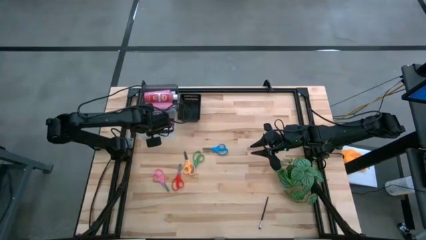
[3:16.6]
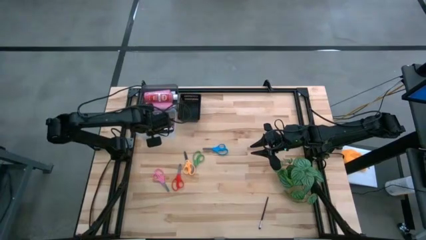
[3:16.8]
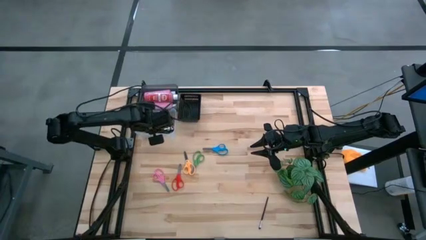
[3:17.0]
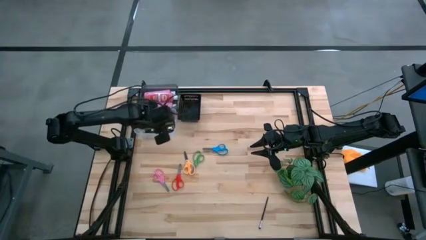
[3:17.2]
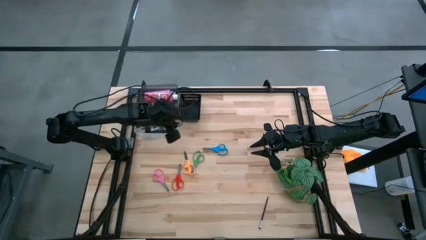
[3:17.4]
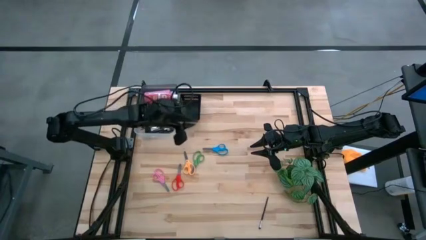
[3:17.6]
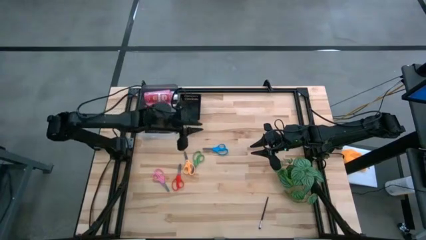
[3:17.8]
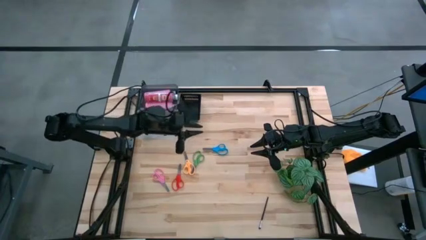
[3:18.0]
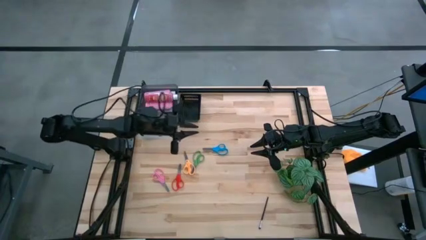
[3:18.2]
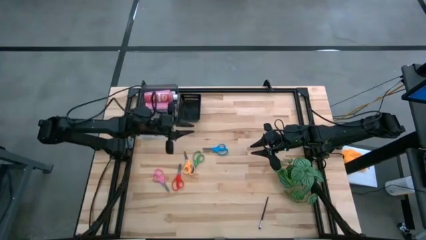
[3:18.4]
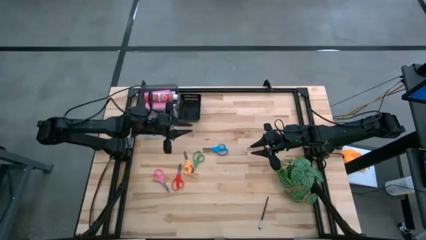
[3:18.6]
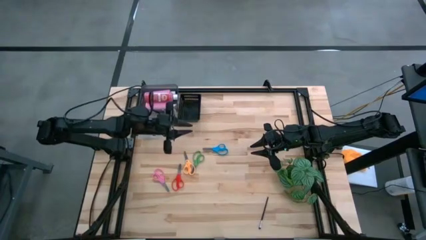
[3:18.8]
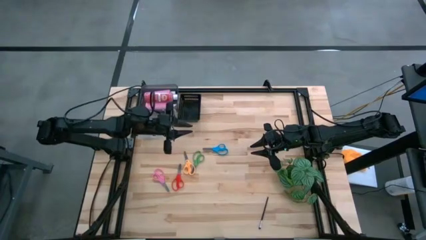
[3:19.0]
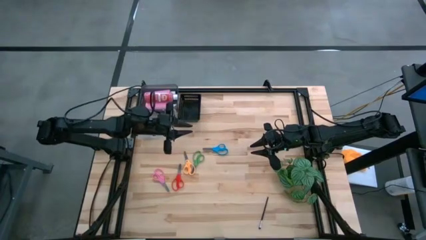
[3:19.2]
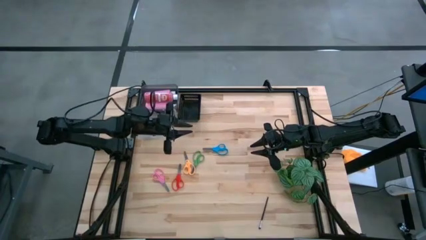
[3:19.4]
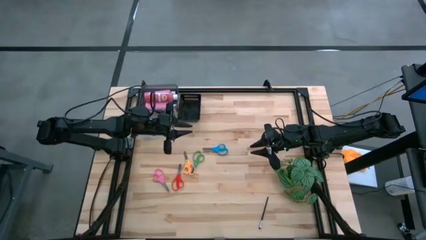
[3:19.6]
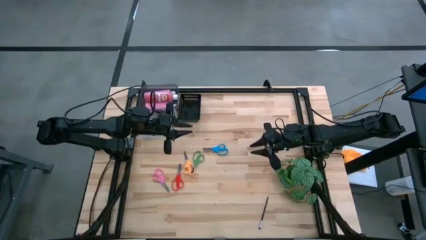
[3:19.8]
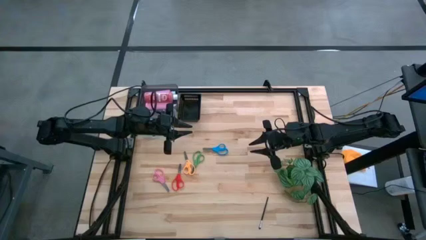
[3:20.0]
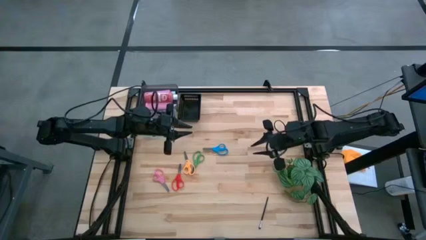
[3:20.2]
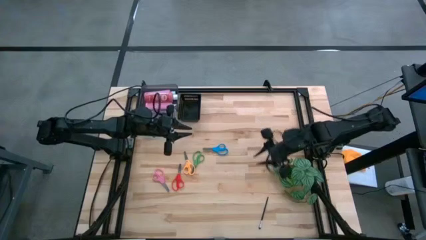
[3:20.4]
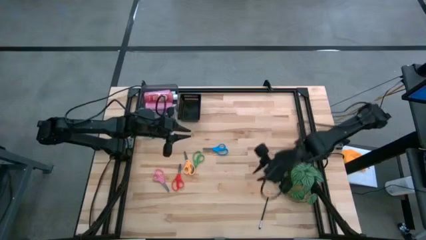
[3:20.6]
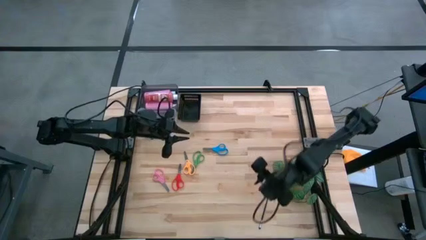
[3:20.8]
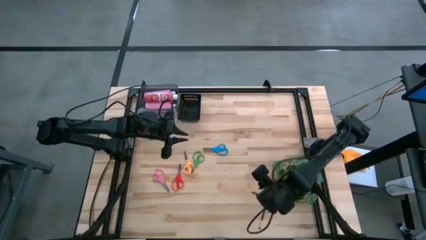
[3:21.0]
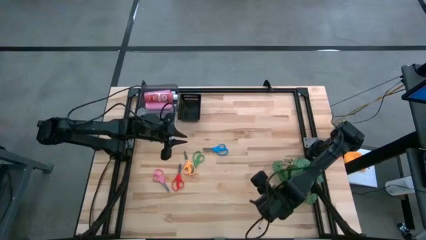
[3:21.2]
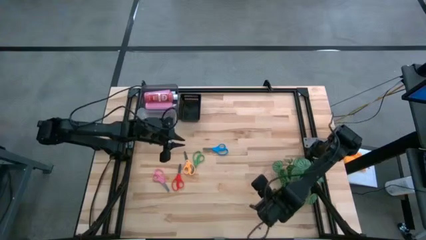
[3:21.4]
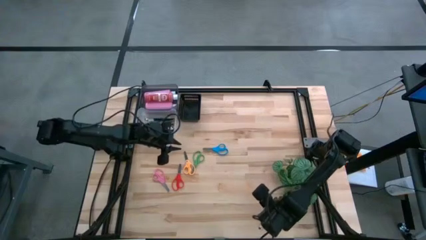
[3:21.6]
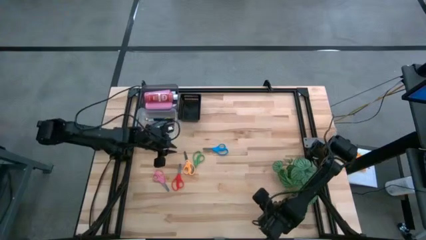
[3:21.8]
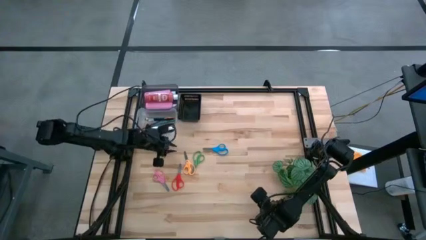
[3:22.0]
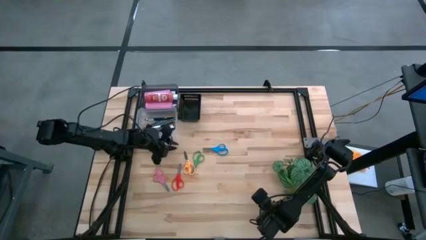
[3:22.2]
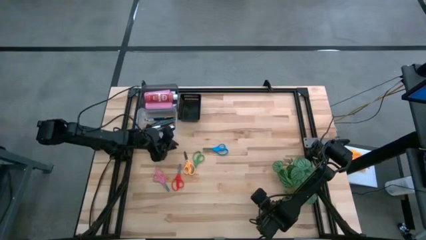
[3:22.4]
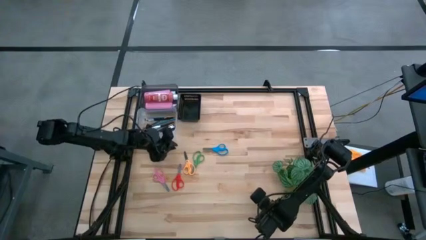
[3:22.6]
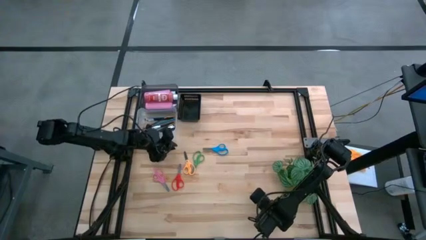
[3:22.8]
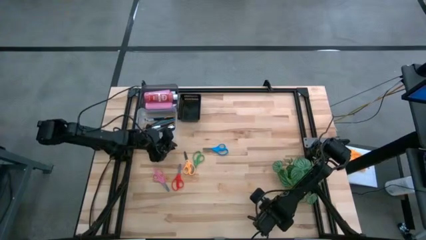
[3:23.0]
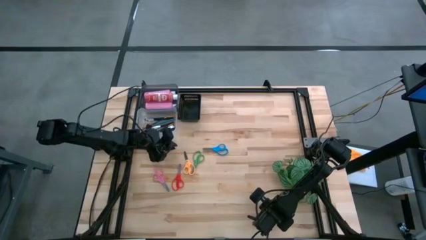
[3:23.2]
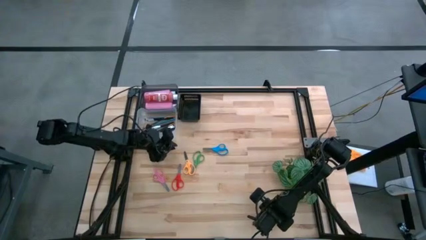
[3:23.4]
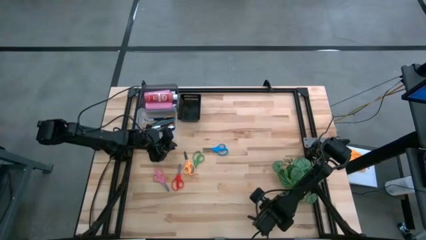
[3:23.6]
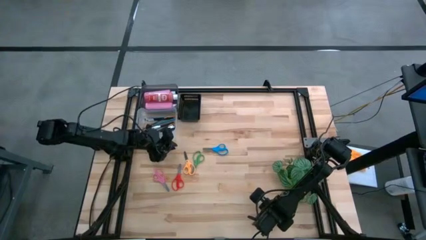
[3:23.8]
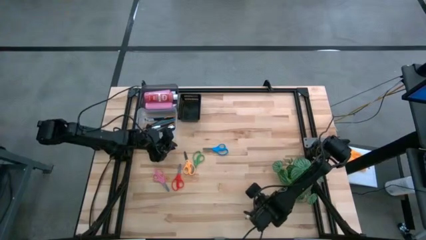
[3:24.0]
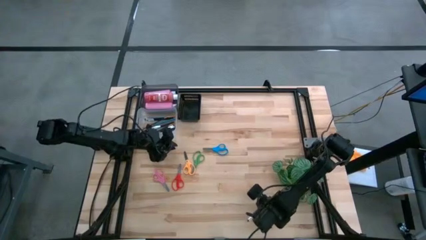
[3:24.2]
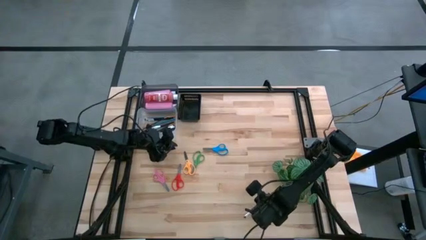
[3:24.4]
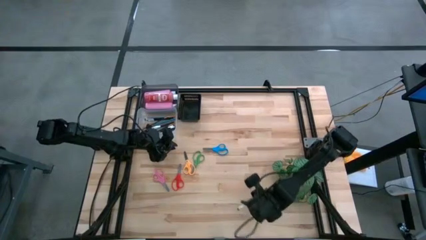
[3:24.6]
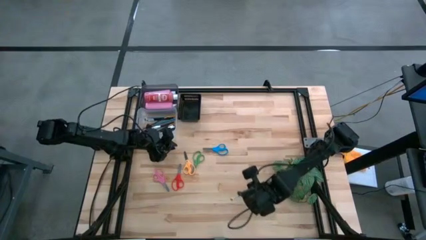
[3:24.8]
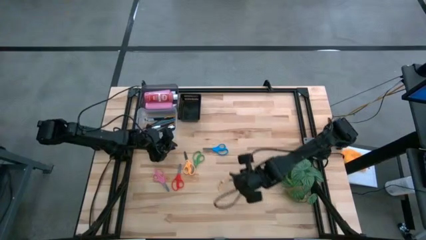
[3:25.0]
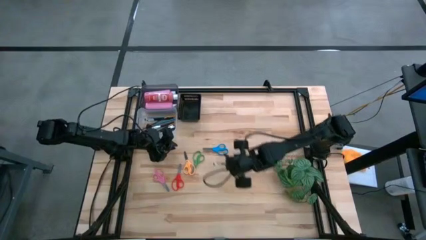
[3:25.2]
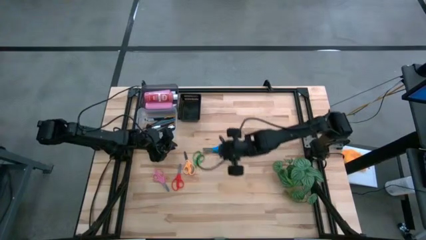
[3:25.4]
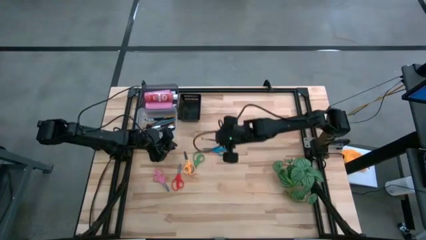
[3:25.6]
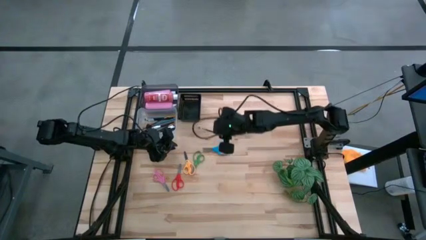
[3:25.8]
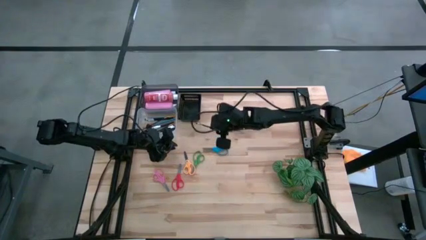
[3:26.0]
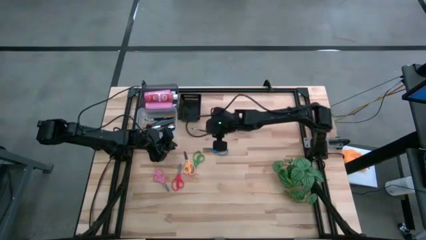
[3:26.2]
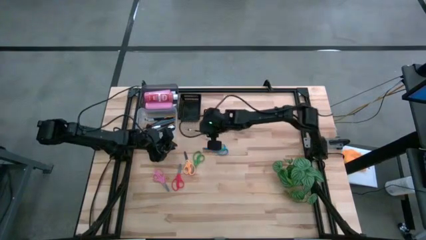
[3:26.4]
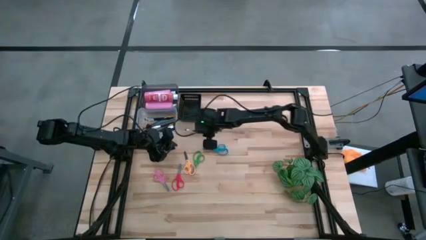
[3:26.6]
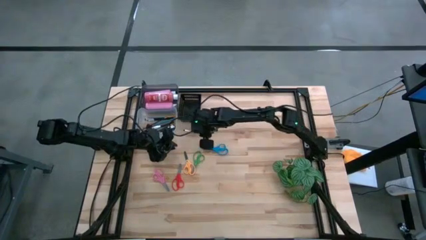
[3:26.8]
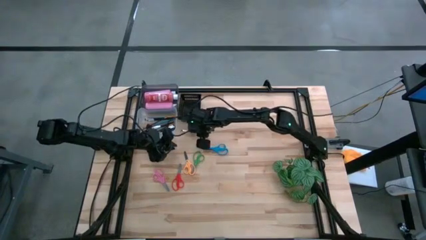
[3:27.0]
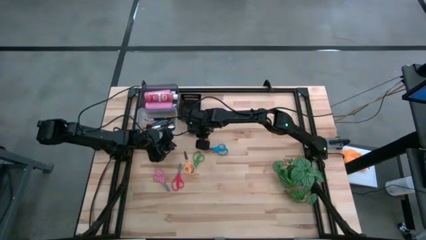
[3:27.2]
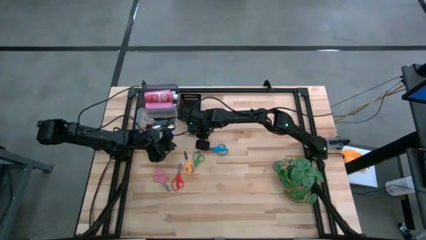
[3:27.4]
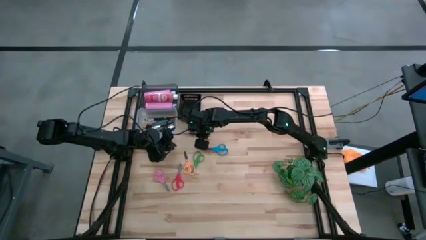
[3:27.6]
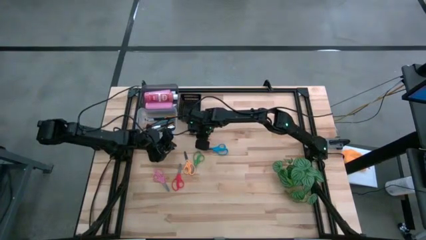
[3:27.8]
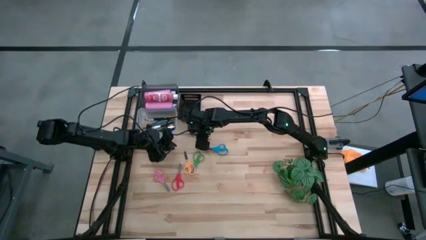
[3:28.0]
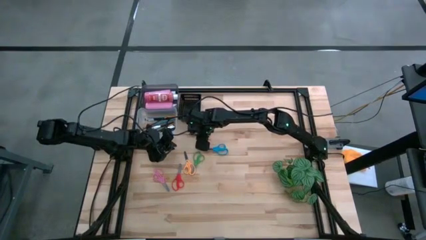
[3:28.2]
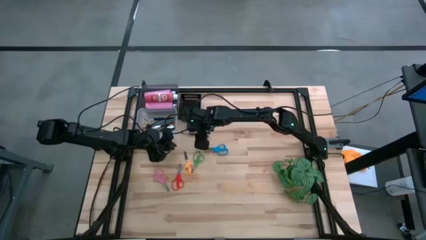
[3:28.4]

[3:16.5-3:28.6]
Task: Pick & Place Paint Supplies
Put the black paint brush into the transparent bin

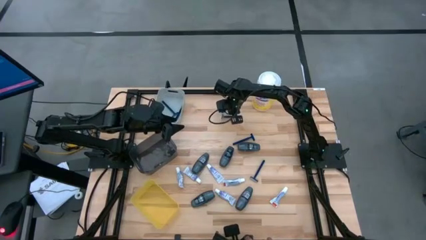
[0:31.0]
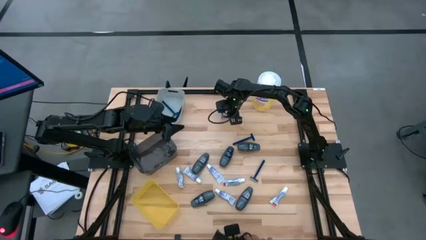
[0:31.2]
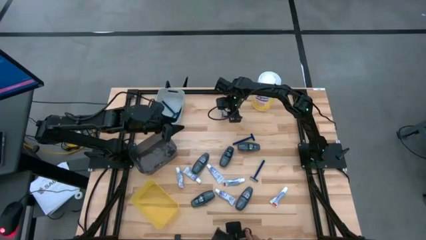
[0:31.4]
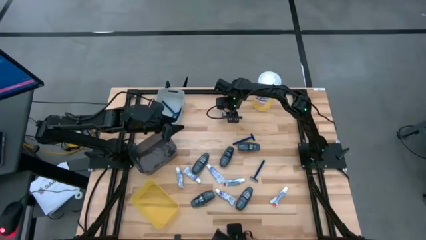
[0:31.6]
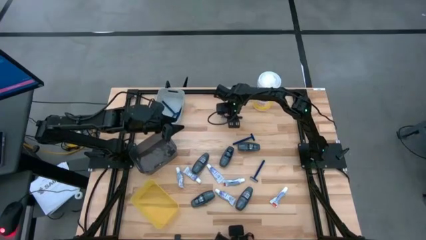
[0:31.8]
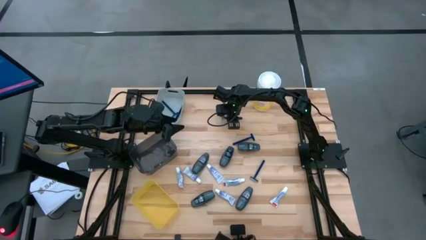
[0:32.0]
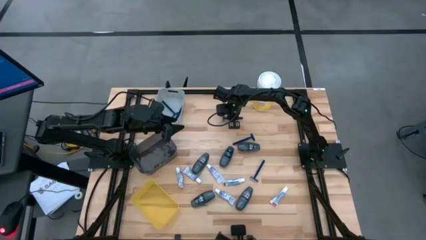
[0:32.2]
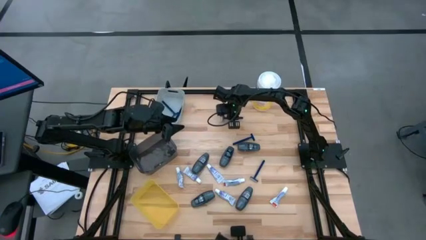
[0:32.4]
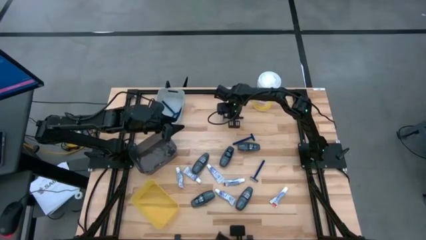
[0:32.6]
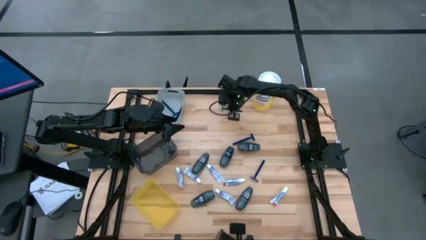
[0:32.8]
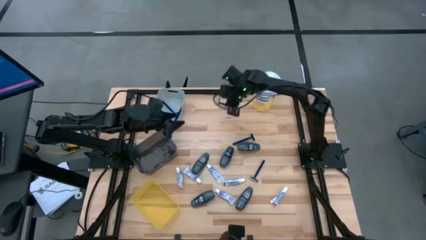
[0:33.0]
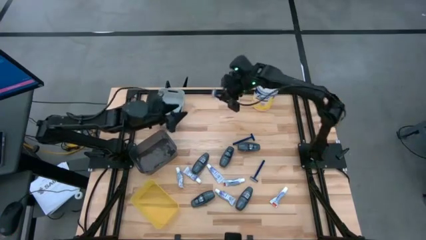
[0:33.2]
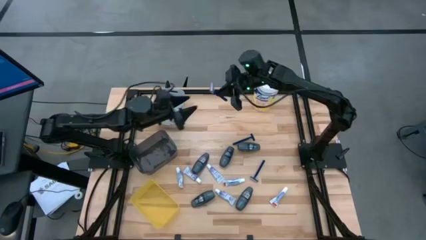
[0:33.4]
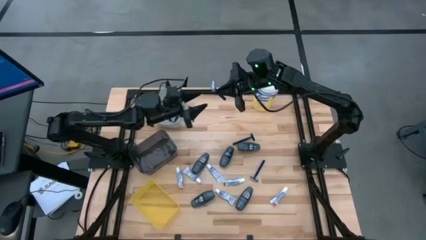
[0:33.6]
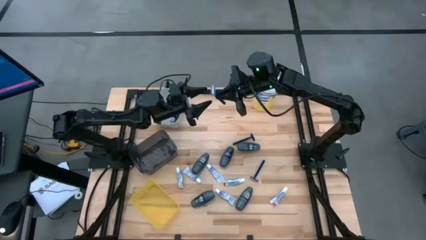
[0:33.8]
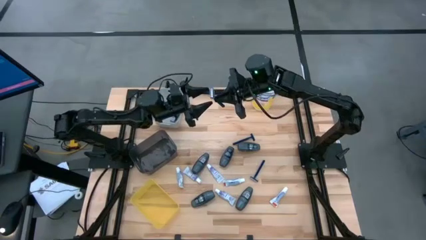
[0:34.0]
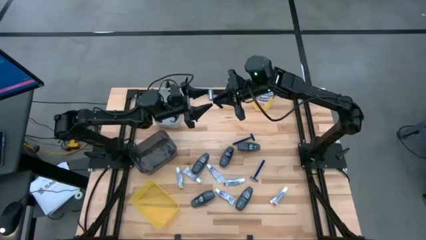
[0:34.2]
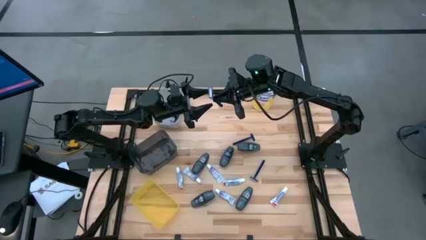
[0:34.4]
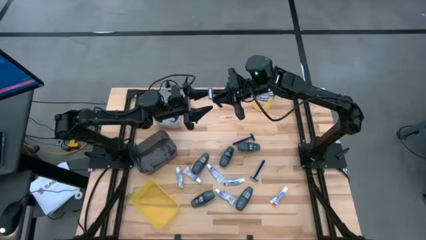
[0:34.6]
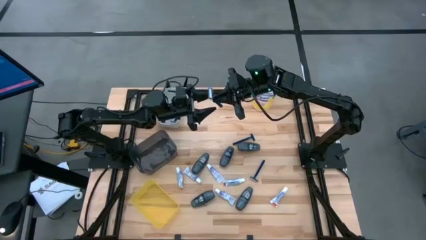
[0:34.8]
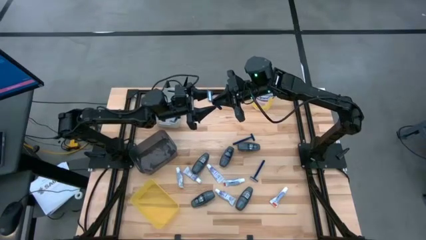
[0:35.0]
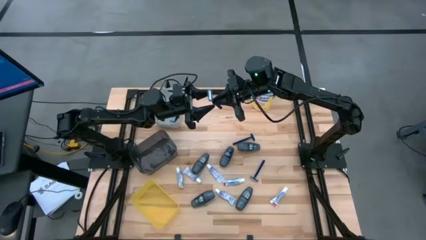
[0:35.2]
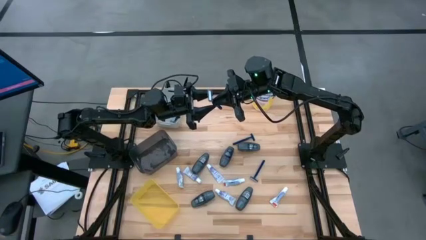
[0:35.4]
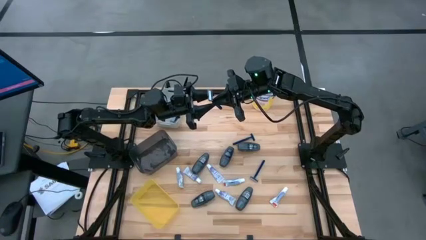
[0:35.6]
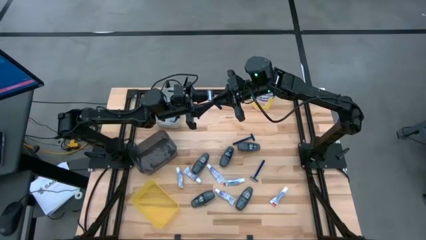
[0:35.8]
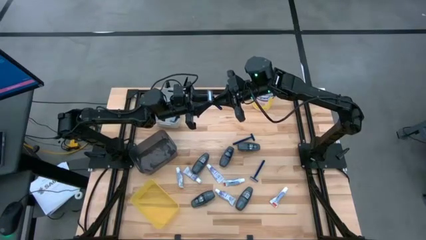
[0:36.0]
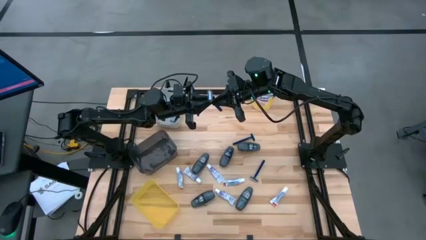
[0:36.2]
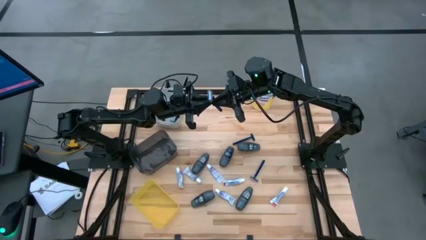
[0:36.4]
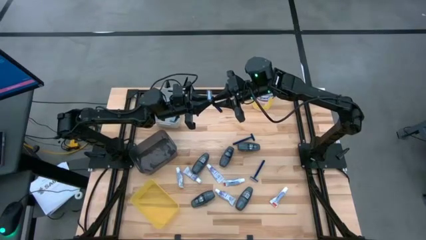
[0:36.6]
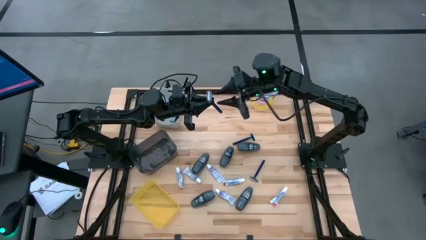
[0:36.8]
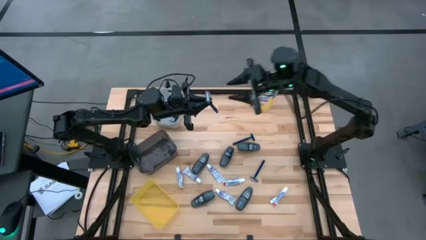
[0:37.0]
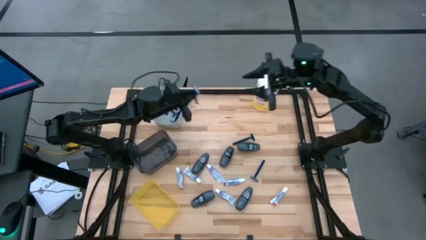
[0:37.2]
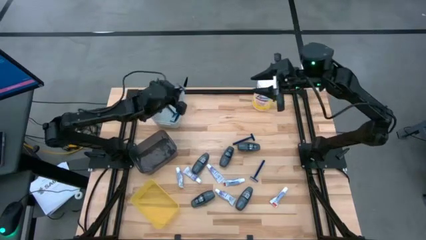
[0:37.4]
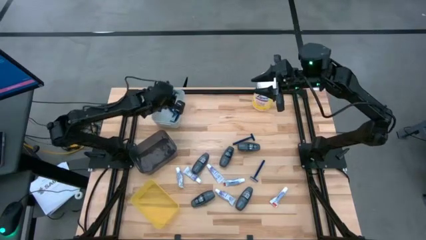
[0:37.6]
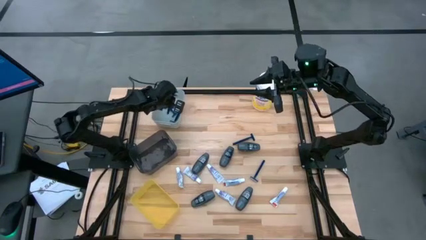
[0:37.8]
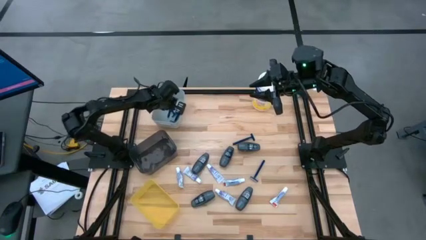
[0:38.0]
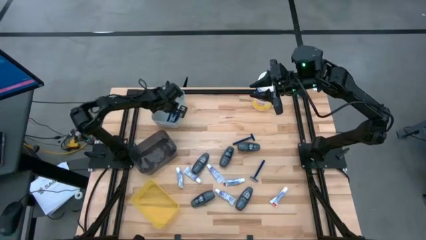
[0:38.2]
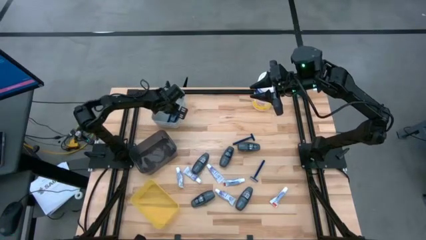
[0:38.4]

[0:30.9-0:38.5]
Task: Pick & Place Travel size toiletries
Put the razor into the gray bin put the razor into the gray bin
